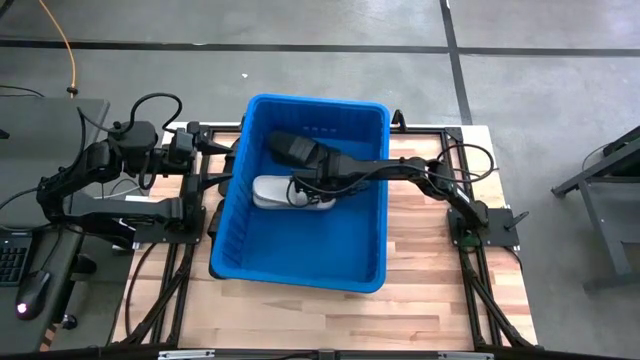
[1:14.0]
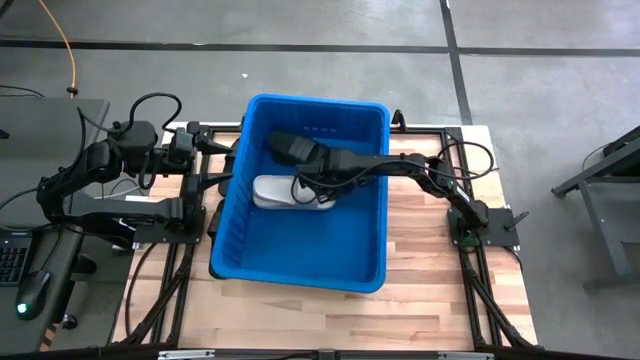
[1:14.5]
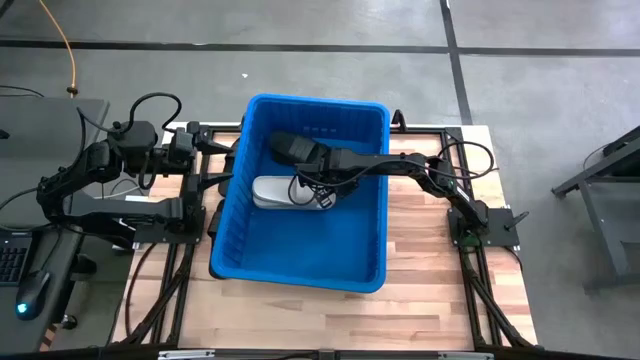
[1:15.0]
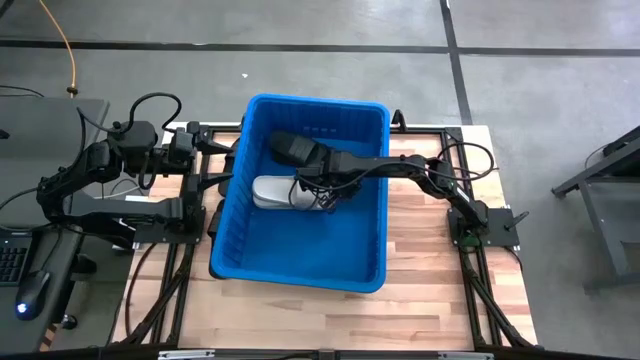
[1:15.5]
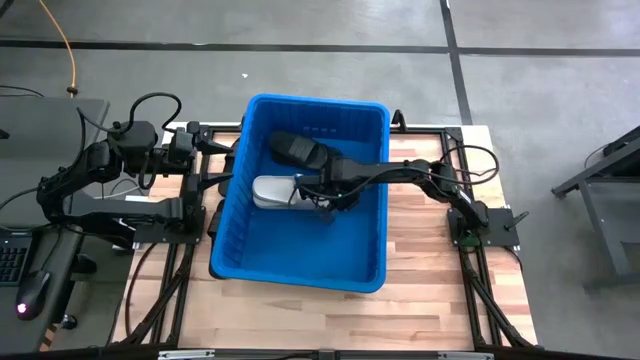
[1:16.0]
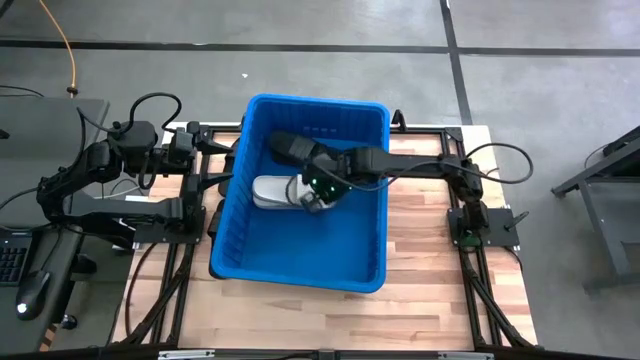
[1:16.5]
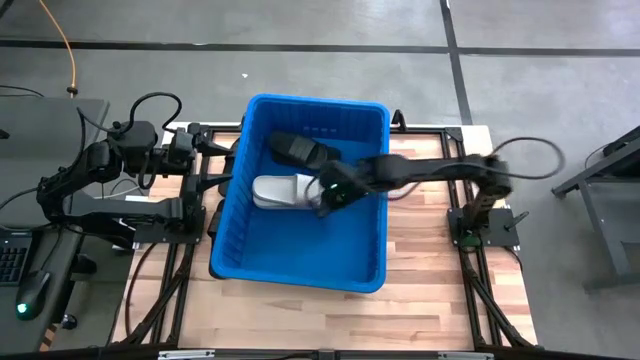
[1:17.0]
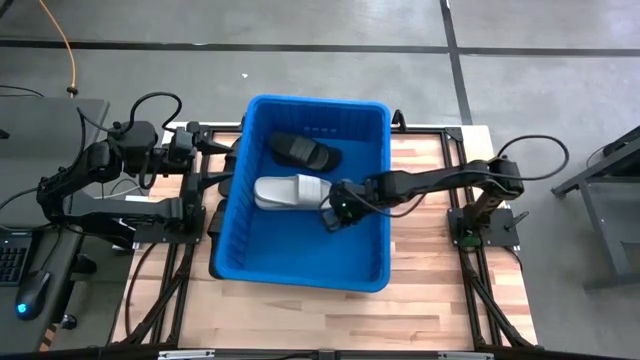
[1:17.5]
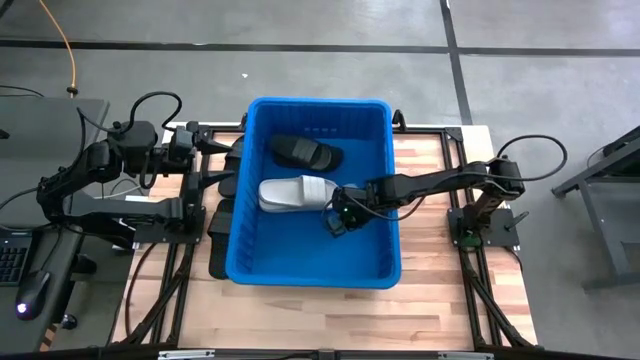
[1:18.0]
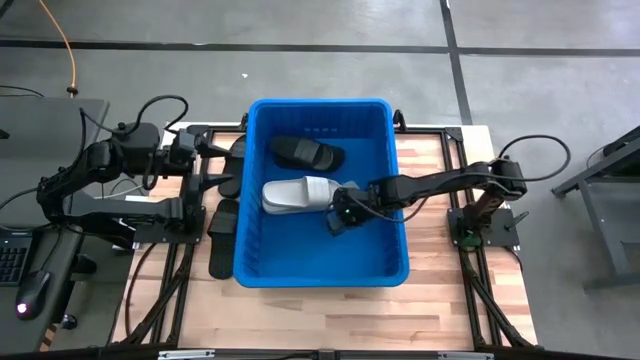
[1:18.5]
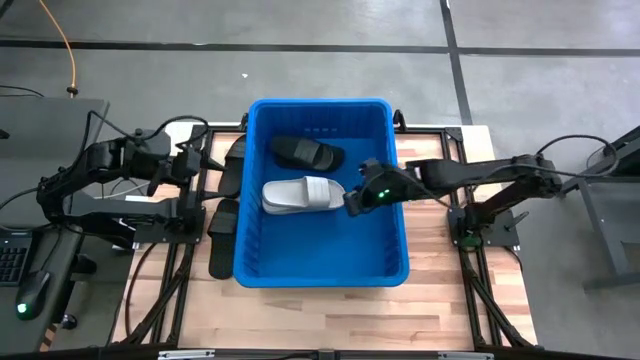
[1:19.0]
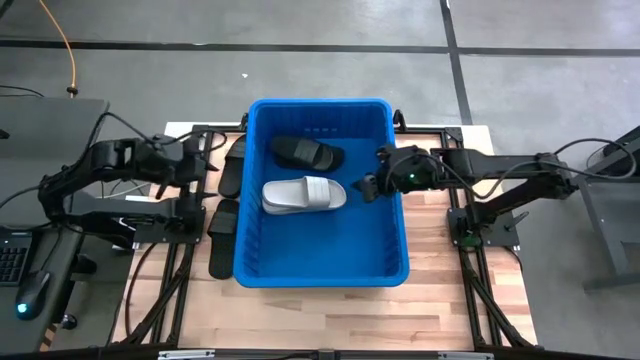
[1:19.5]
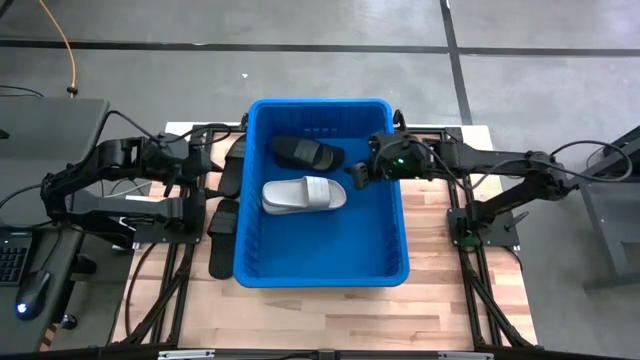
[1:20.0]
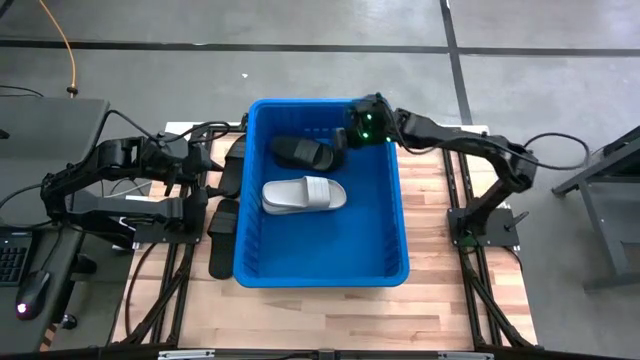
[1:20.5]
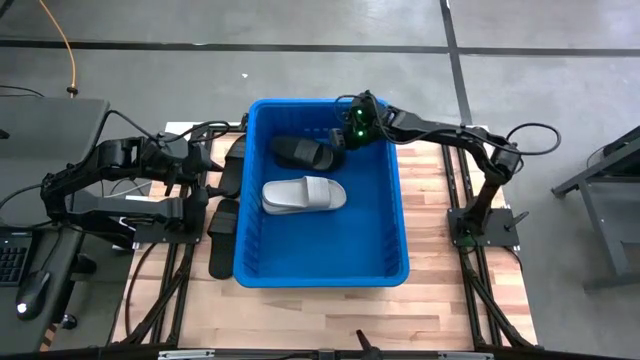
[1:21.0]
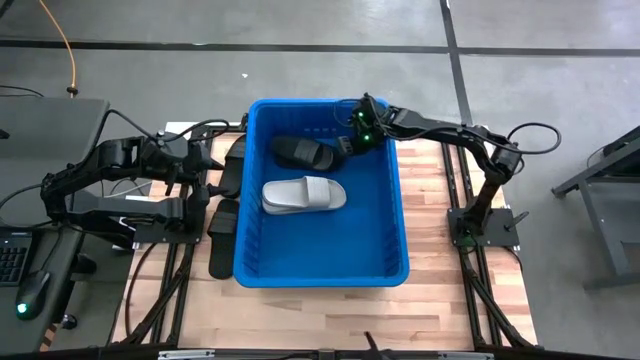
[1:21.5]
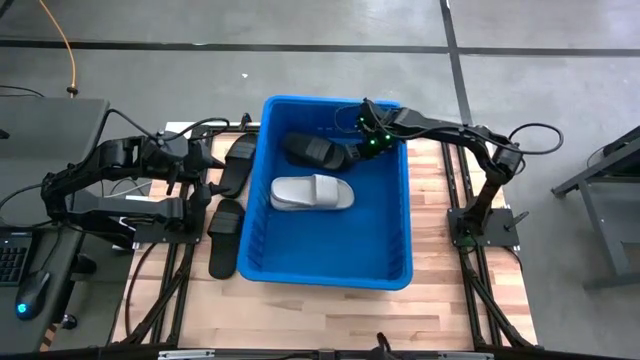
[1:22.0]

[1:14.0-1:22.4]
Task: Pick and place slides into bin
Adjust the blue container

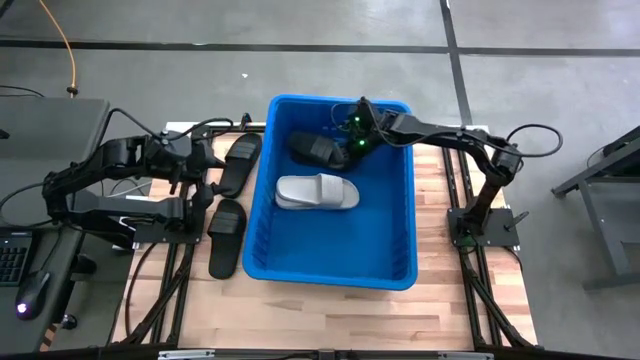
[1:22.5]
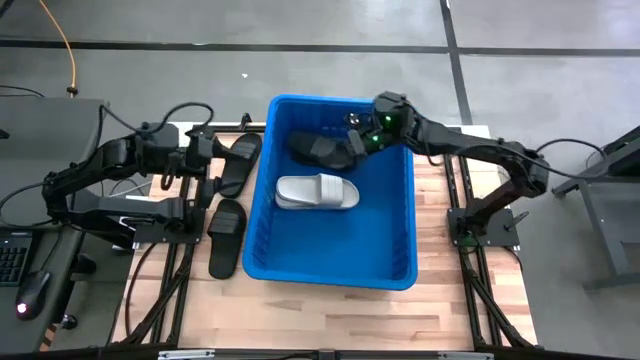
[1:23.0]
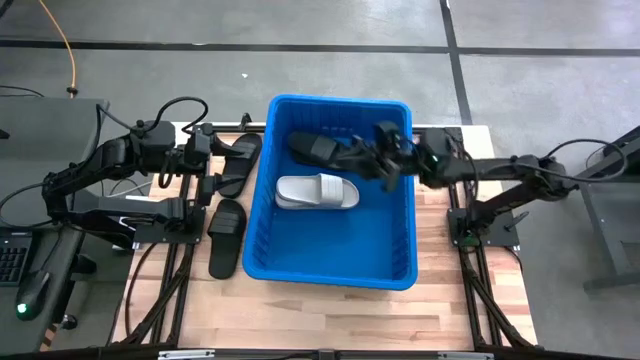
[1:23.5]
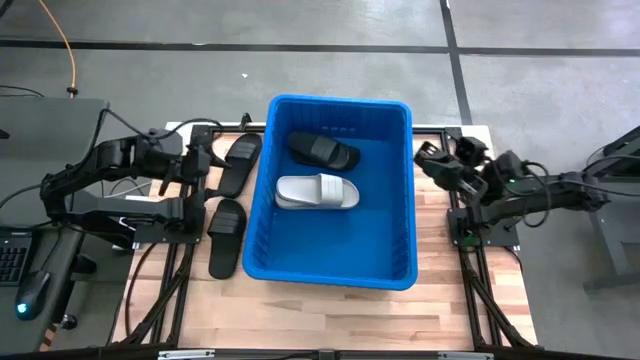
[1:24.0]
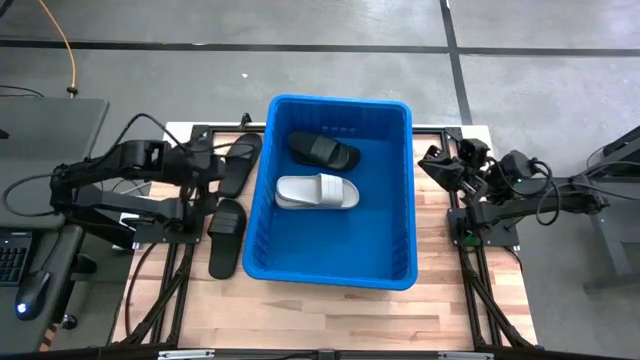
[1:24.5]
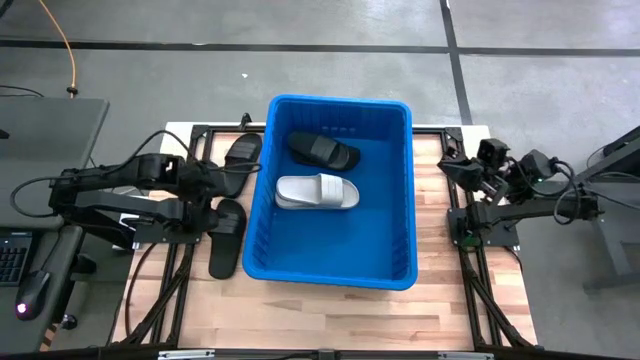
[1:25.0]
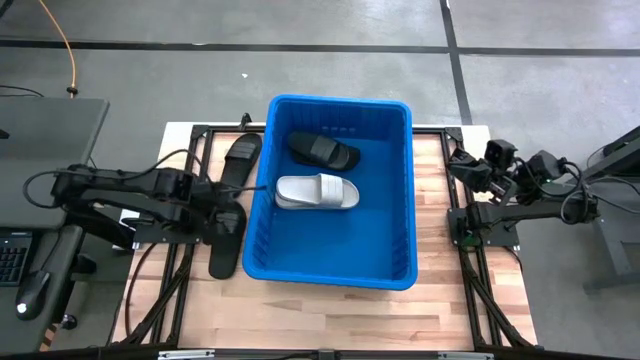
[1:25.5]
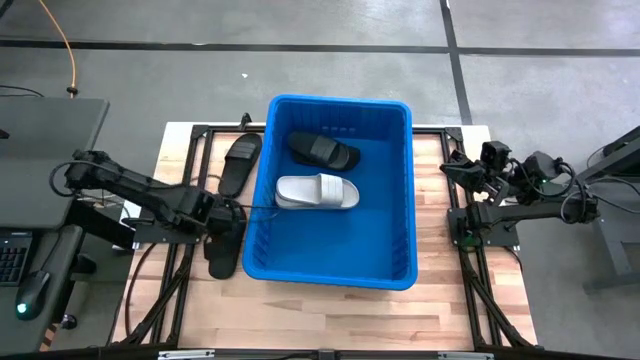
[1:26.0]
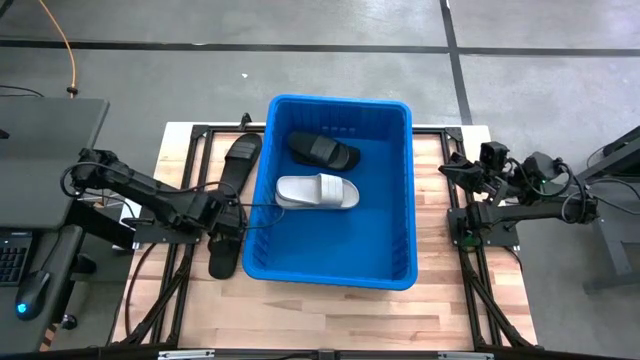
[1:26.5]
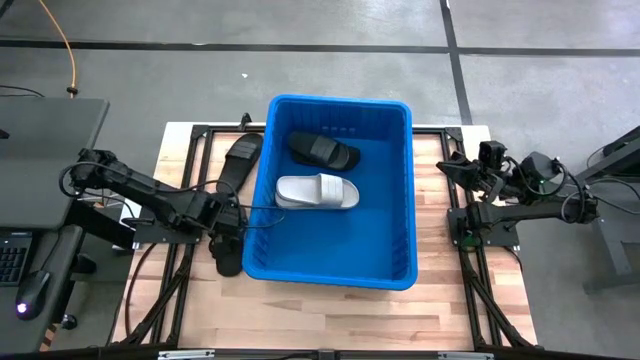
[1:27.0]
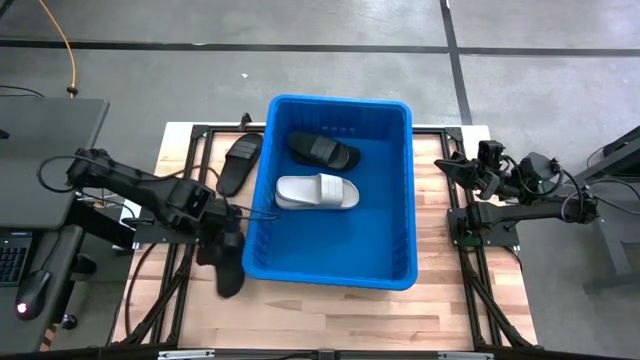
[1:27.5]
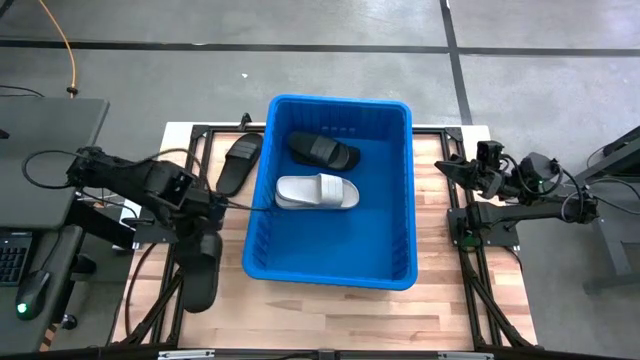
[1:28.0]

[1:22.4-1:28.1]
Put the black slide into the blue container

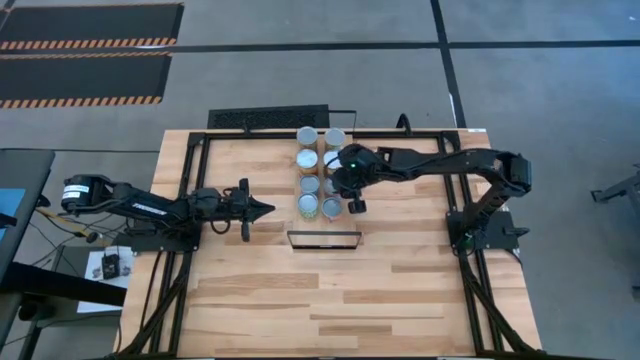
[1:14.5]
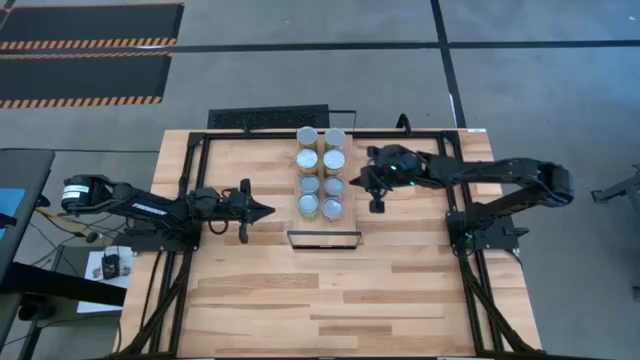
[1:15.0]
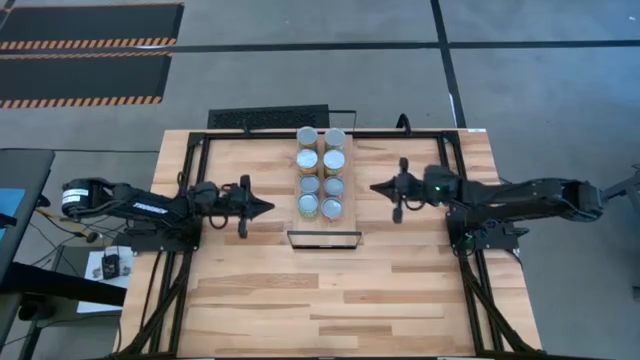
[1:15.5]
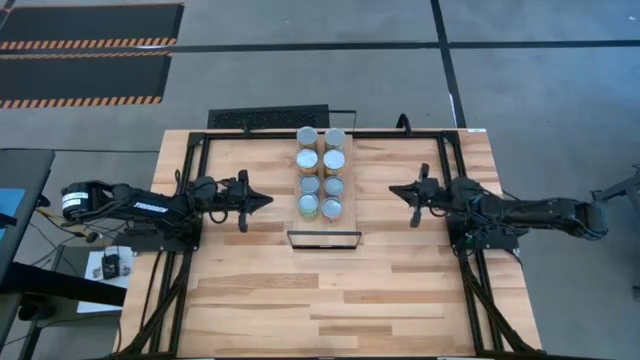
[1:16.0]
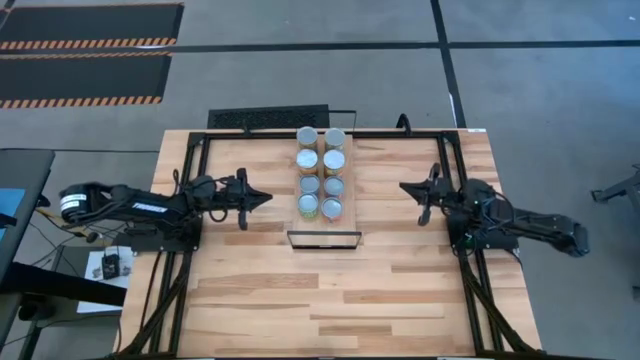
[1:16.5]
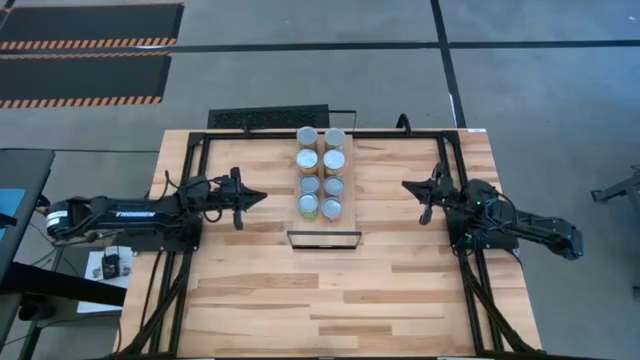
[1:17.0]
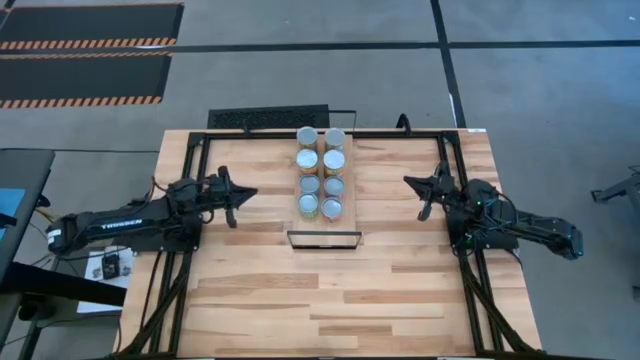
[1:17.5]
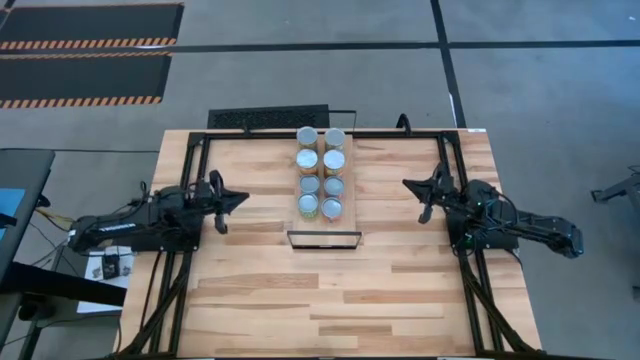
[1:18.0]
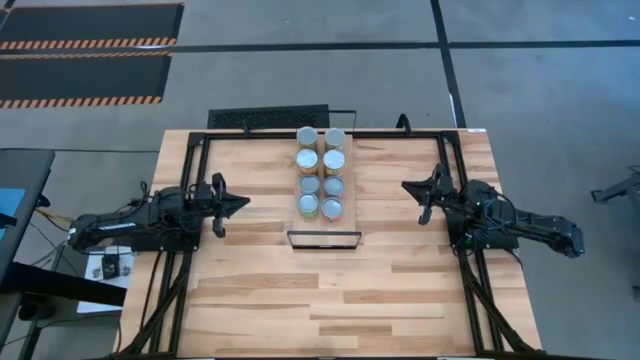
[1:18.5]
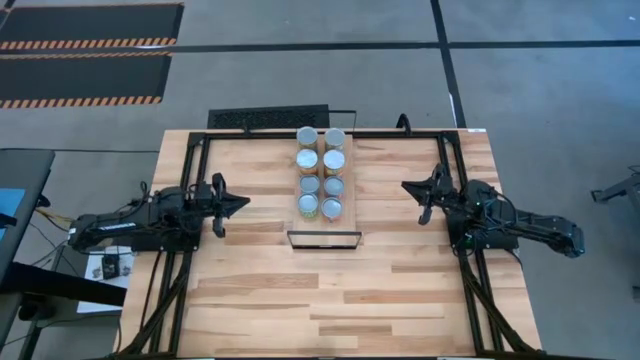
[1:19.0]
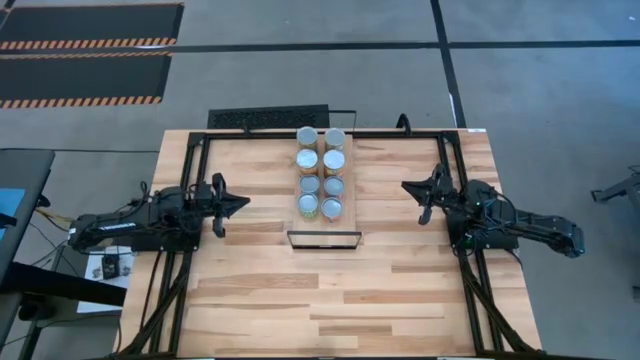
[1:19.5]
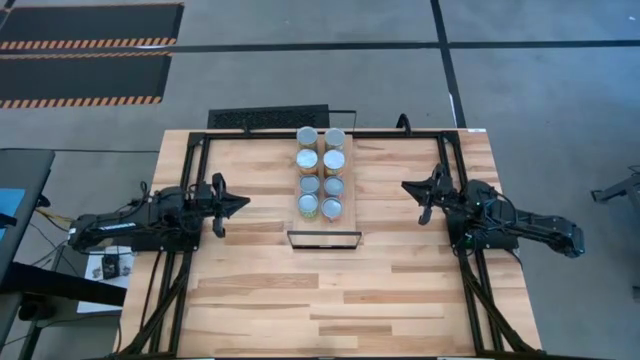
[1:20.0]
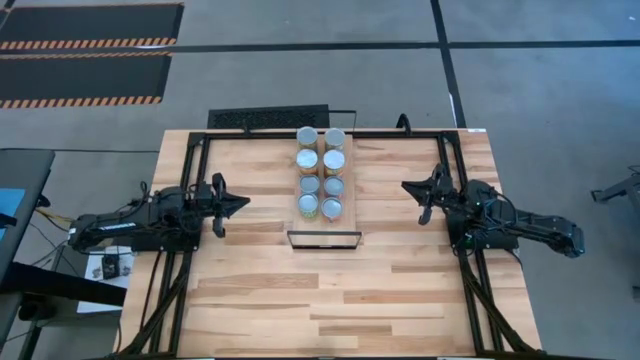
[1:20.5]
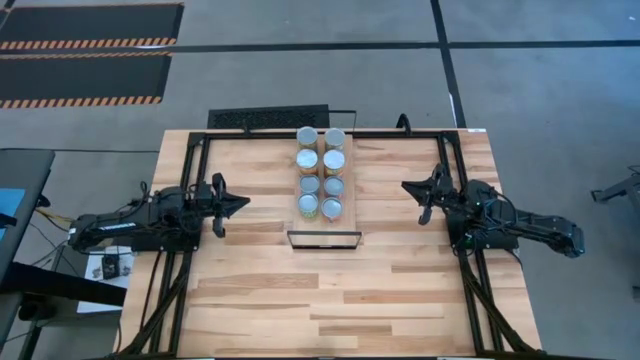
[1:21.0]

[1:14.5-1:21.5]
Task: Pick and place cans onto a shelf
Return to Home Position
